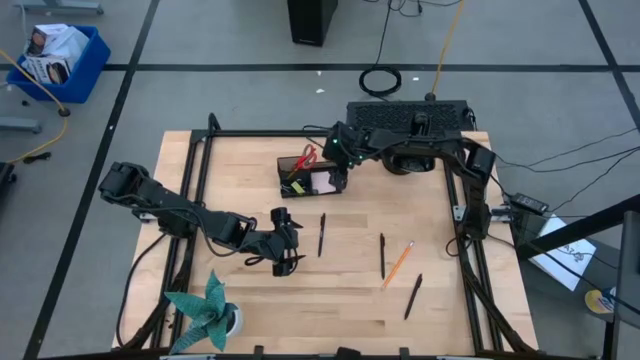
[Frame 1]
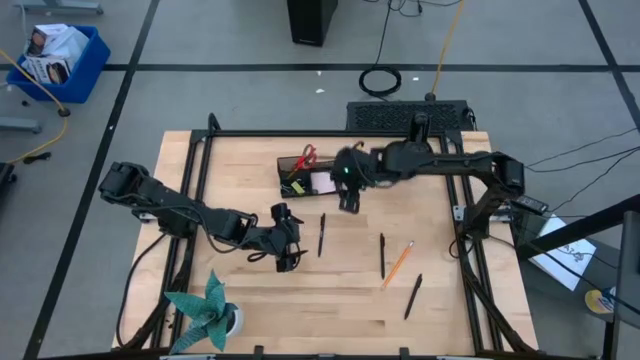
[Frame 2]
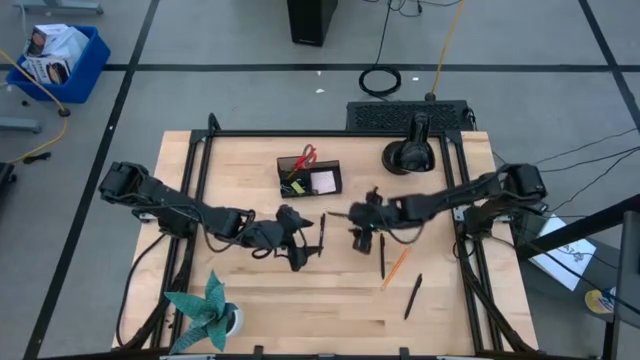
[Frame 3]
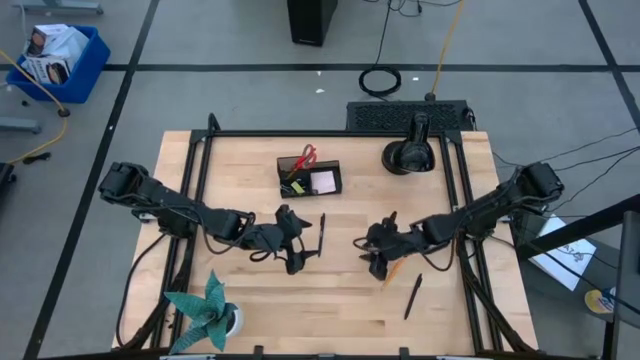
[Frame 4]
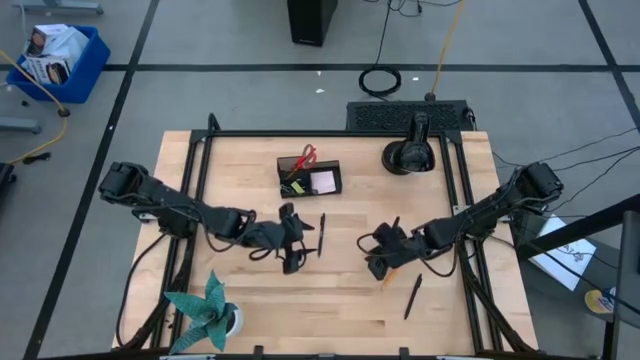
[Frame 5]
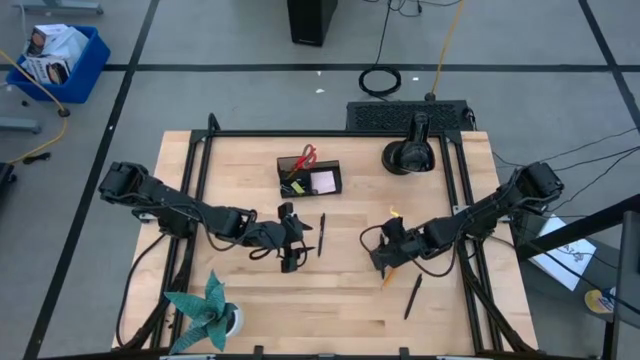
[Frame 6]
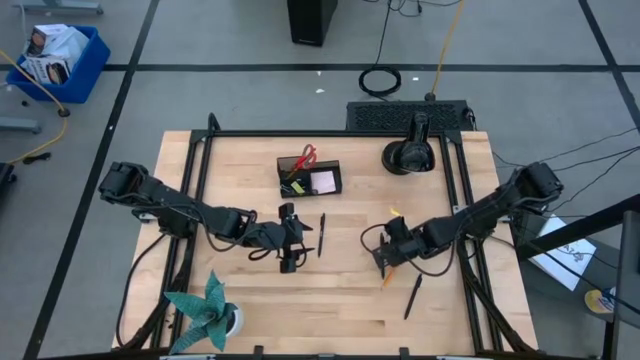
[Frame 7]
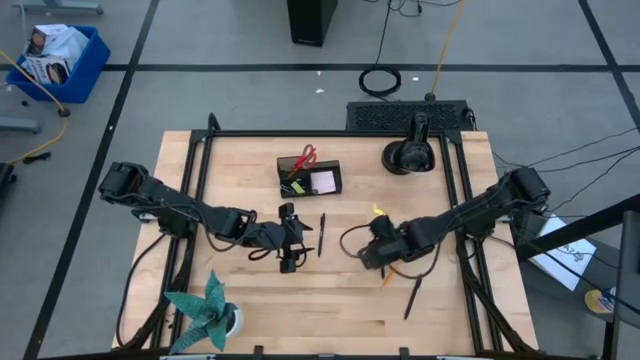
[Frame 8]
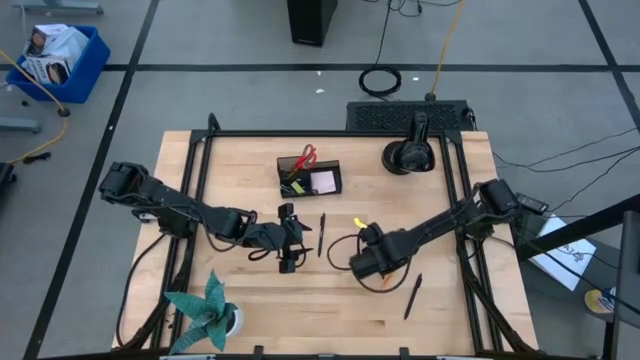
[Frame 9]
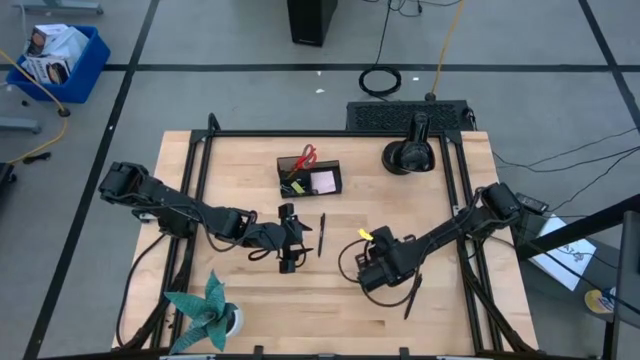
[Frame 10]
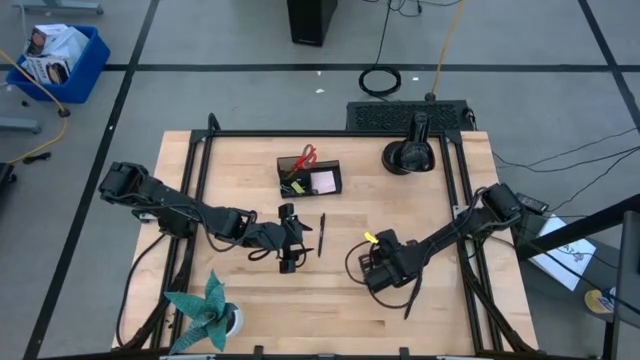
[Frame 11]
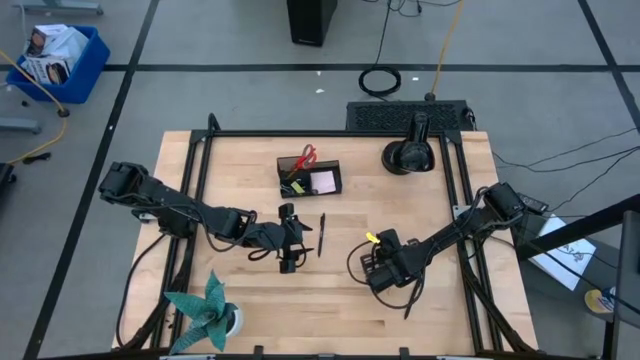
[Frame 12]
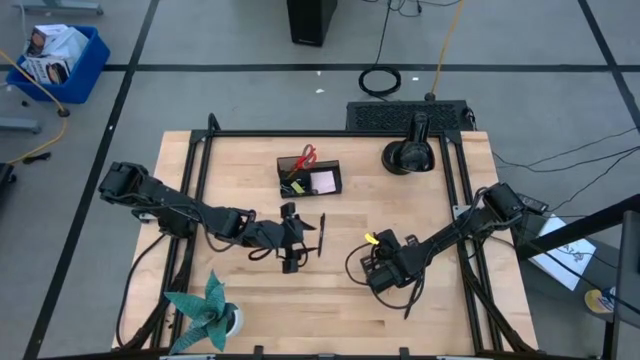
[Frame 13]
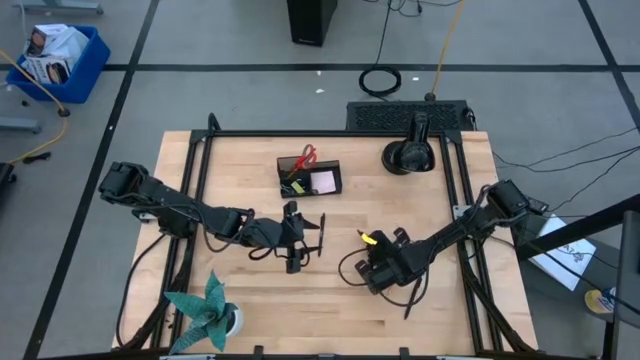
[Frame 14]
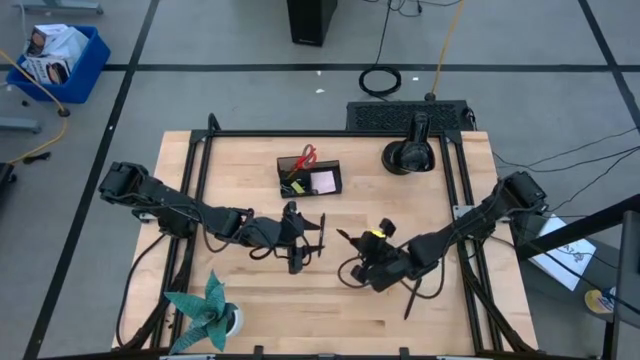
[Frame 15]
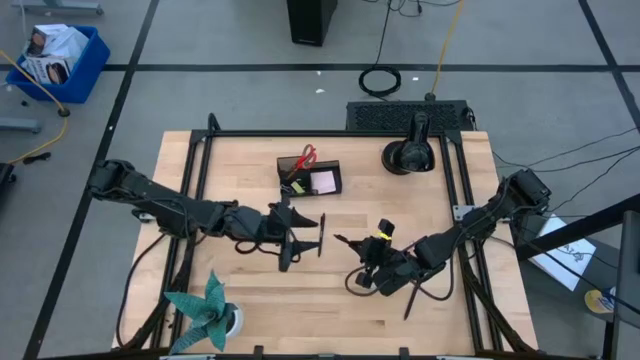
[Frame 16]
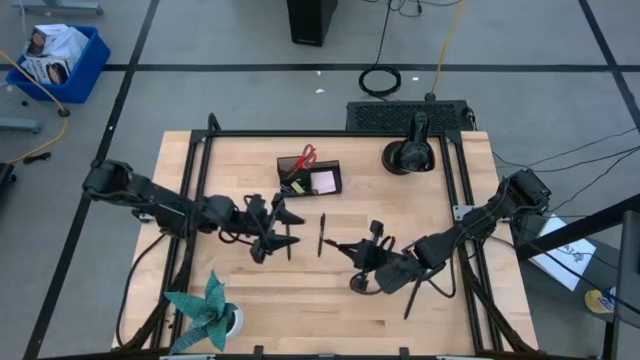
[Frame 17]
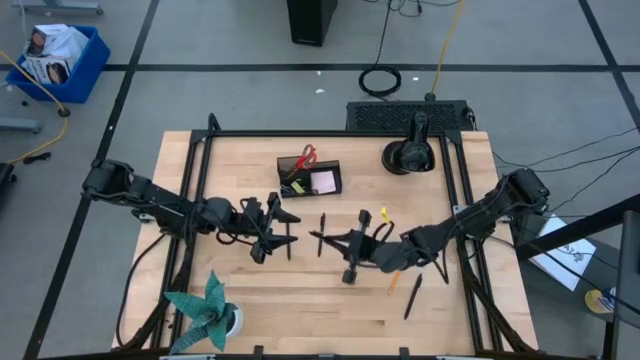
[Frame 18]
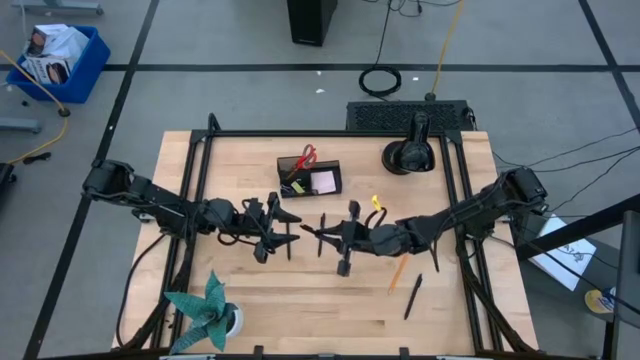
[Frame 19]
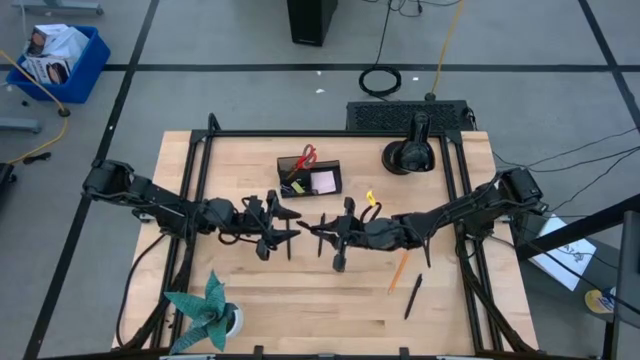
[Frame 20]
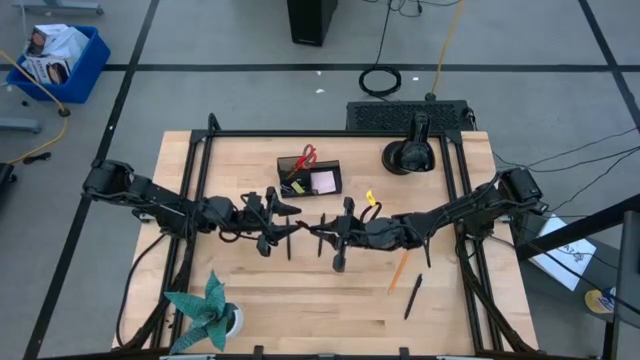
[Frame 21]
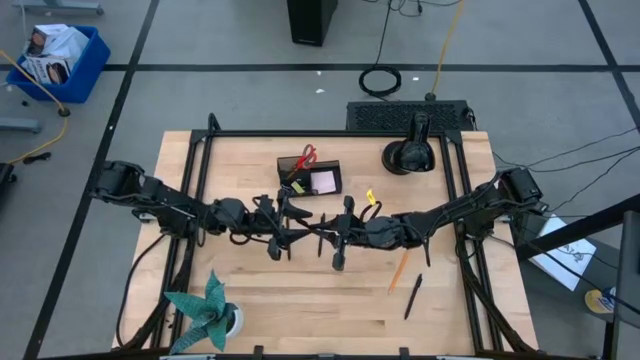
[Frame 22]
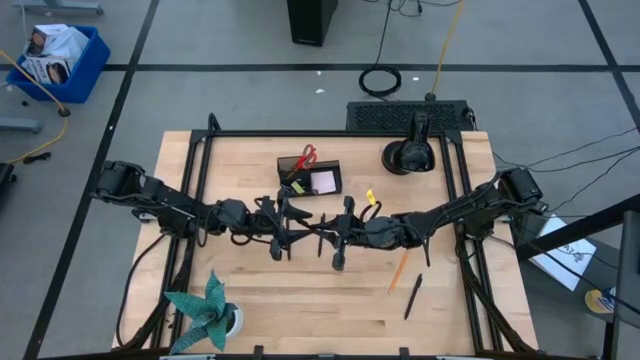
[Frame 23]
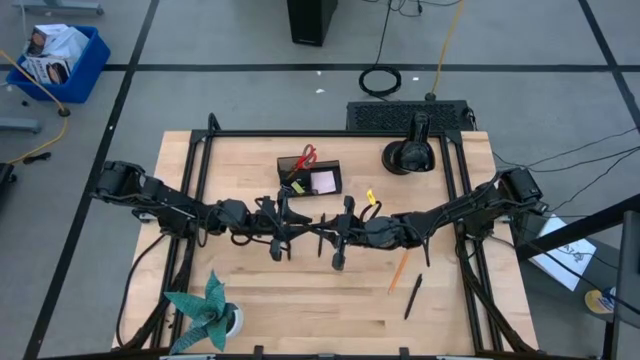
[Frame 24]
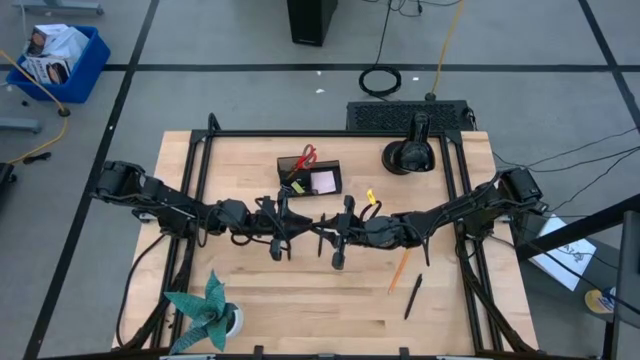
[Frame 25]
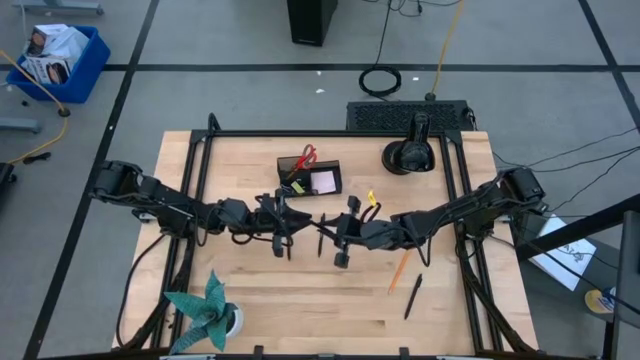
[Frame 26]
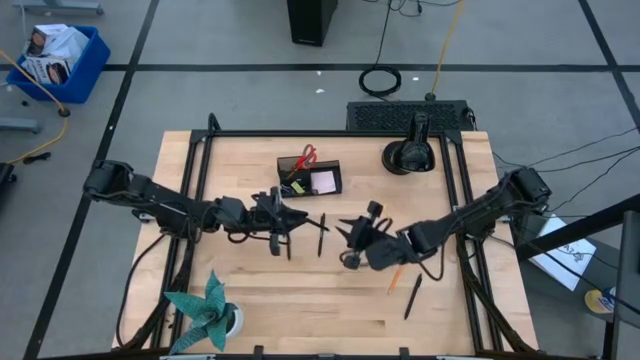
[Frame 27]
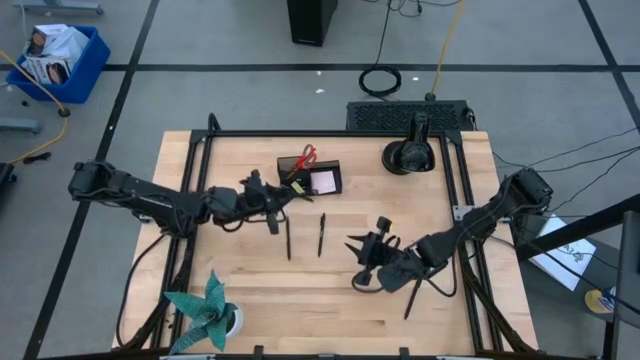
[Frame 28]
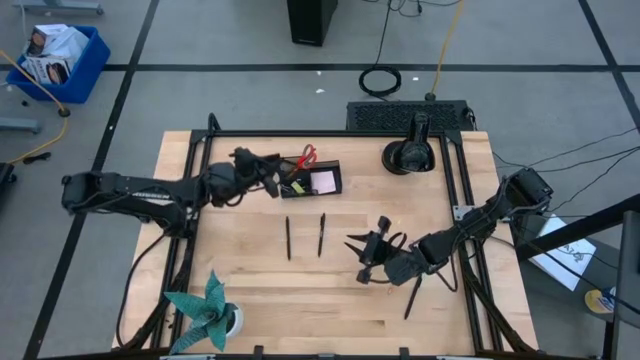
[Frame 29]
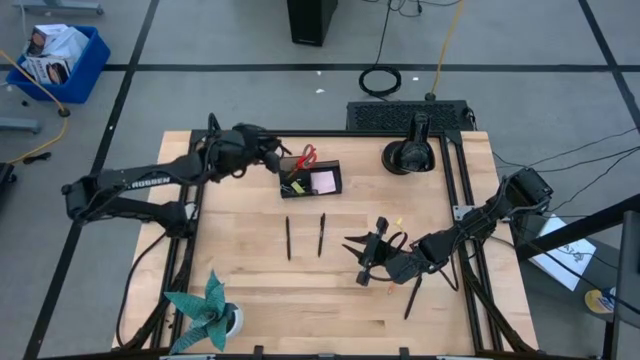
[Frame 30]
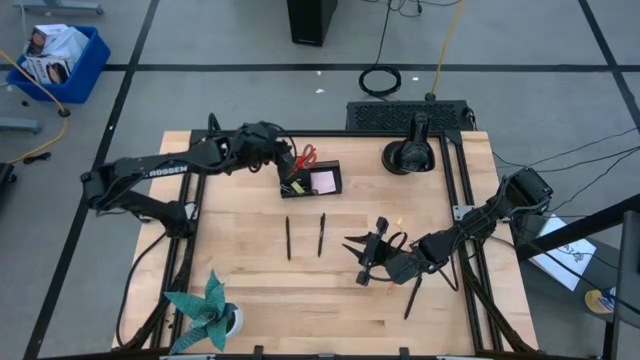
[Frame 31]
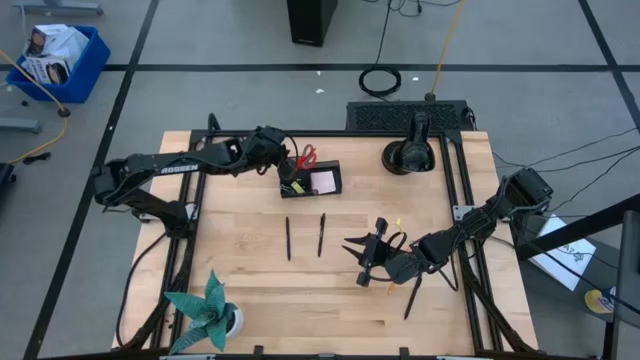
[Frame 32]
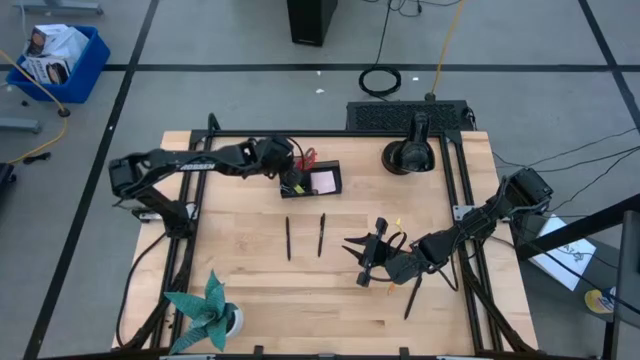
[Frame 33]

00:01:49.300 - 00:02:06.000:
Task: Pick and place office supplies into organizer
Put the black pen into the black desk organizer
